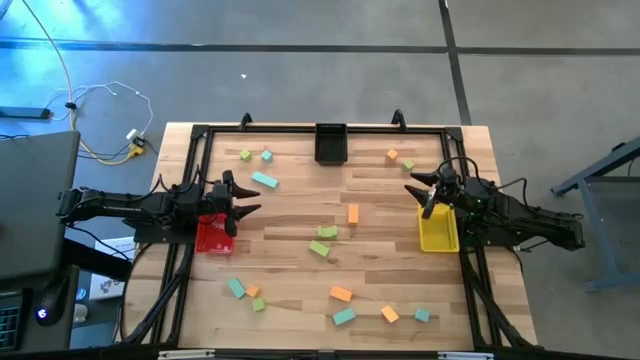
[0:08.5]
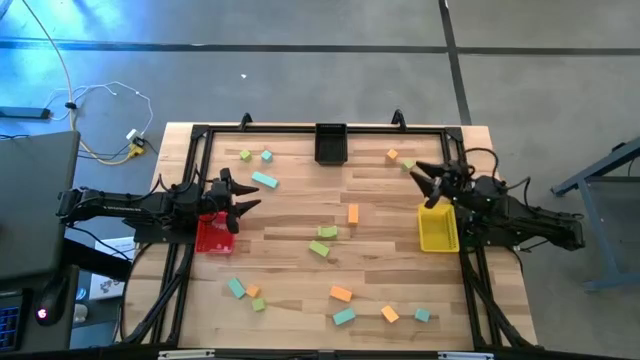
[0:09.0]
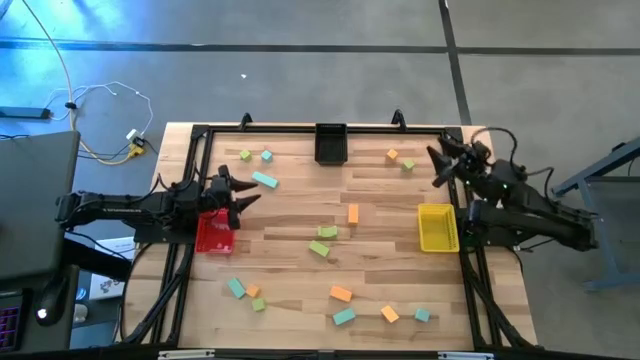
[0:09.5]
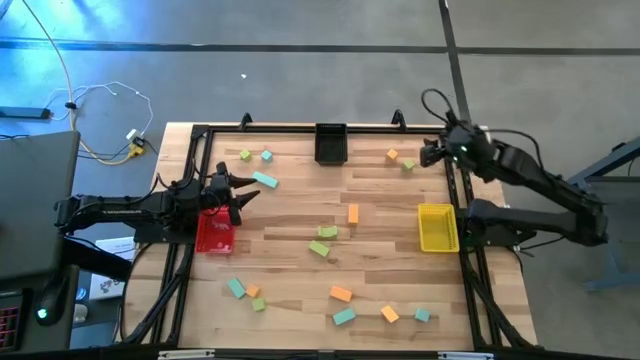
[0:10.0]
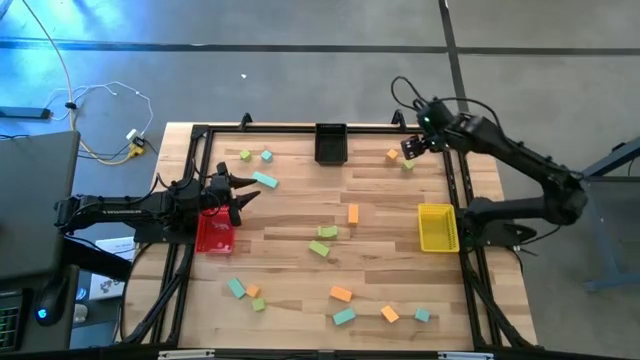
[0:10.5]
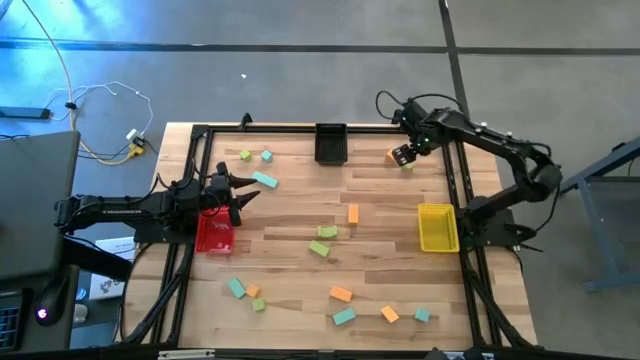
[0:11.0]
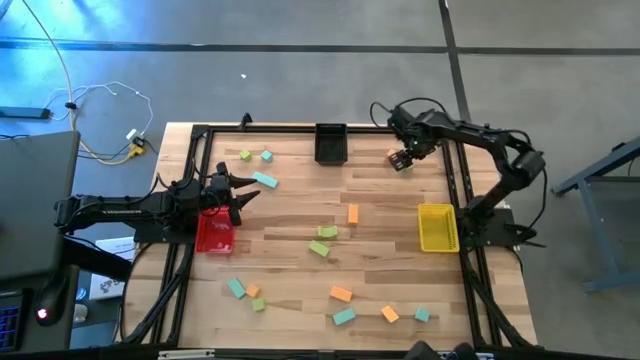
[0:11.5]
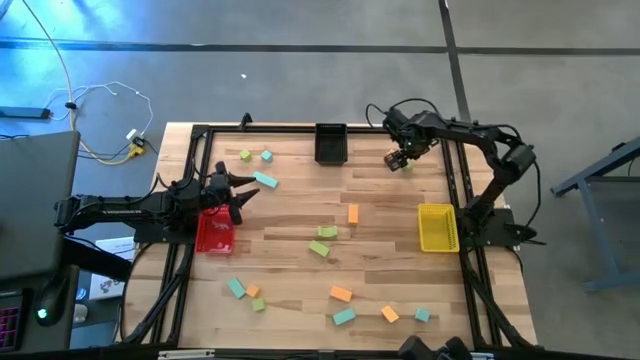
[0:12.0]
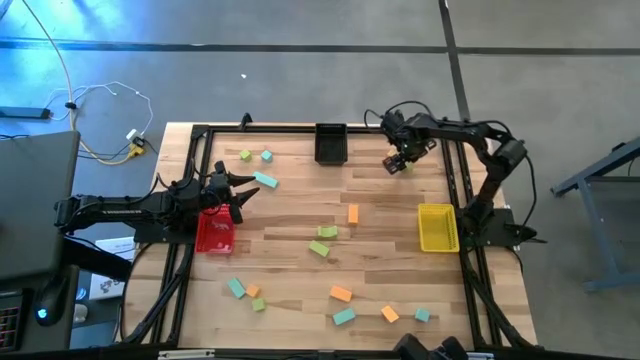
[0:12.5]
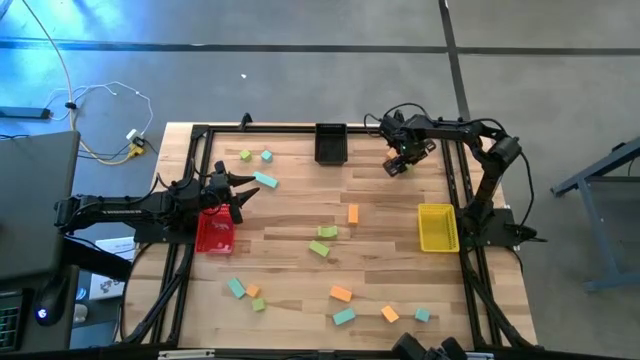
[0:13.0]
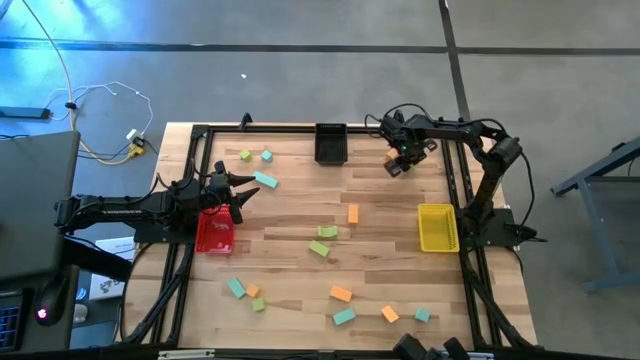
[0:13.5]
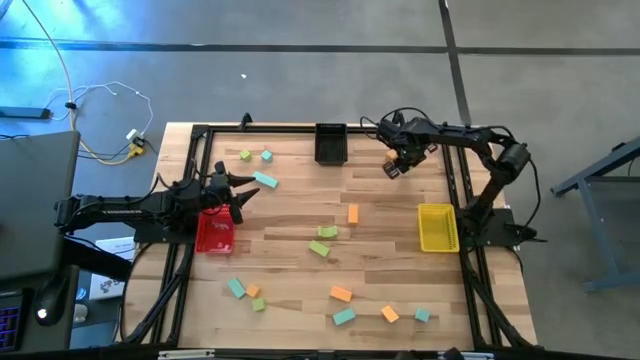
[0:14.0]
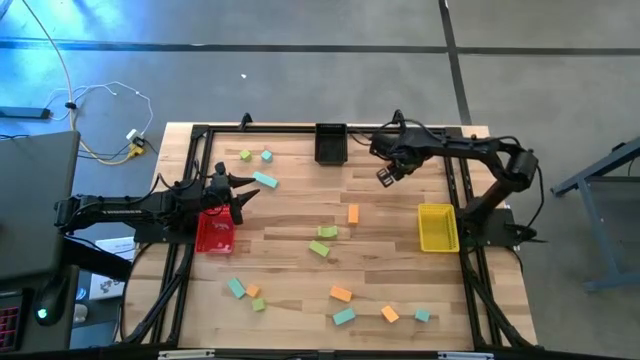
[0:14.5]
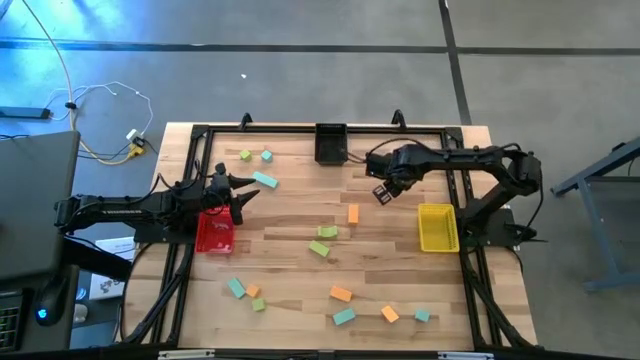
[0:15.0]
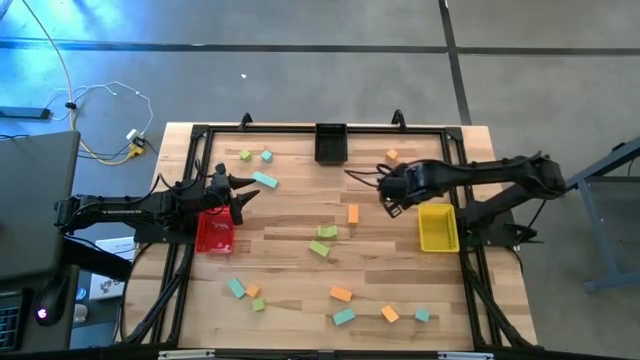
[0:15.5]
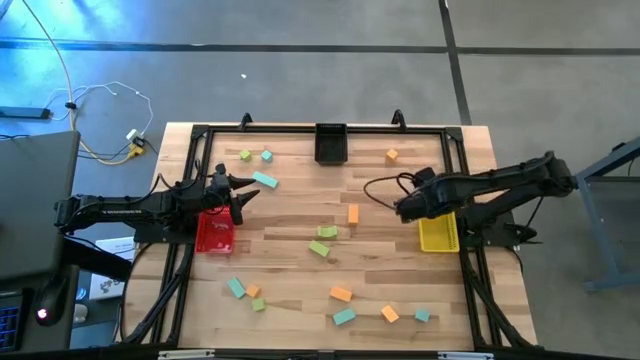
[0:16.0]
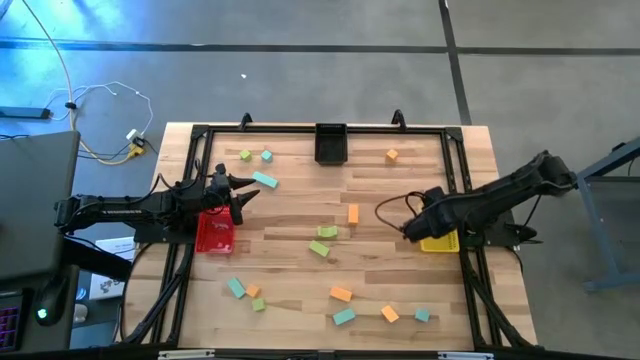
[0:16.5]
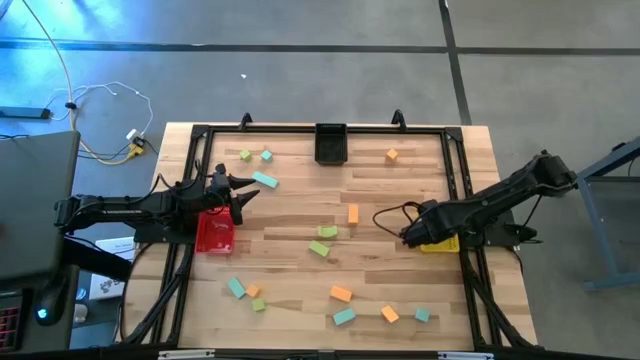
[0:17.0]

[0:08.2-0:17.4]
Task: Sort & place blocks by color
Put the green block into the yellow bin

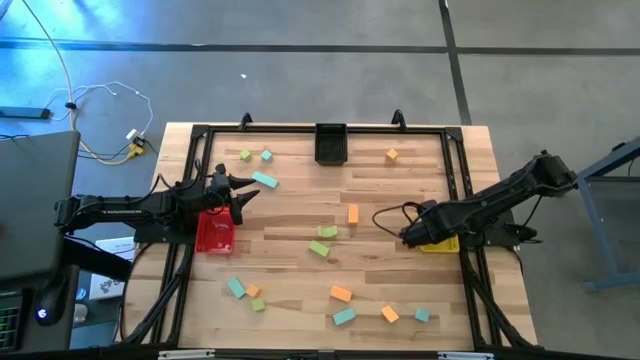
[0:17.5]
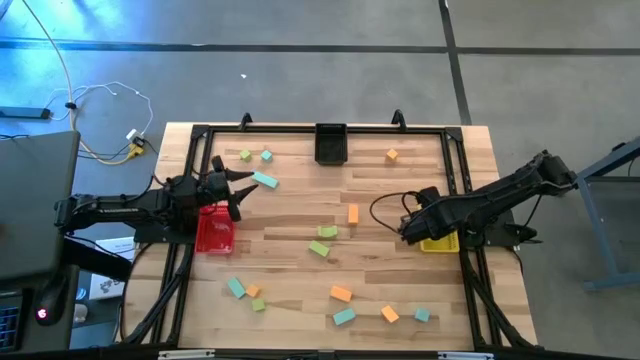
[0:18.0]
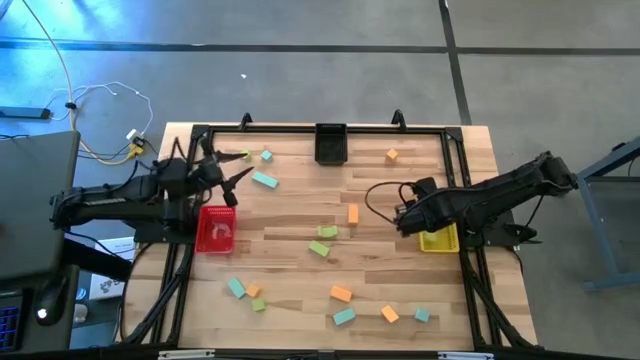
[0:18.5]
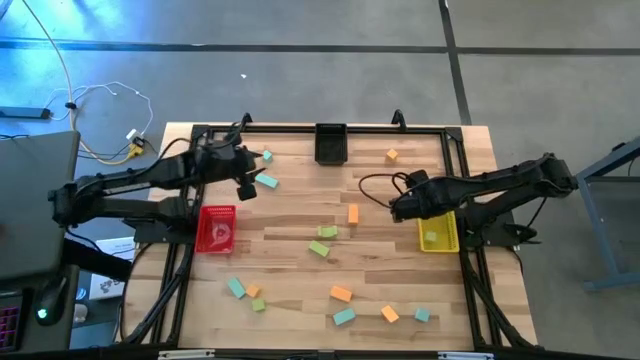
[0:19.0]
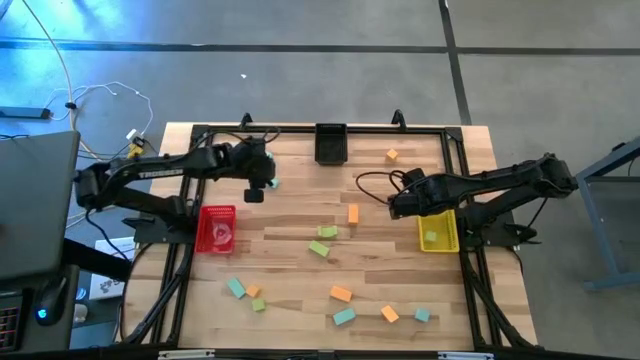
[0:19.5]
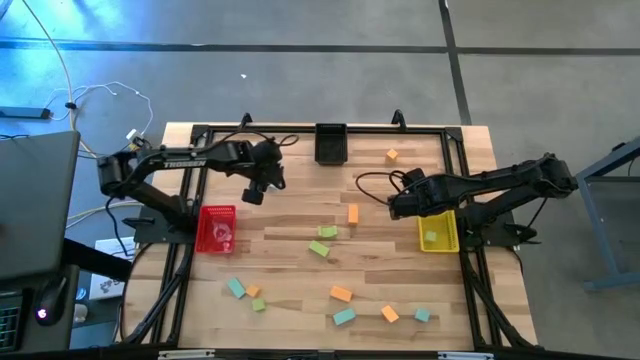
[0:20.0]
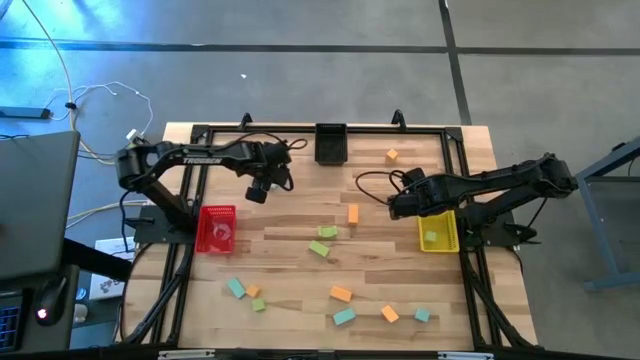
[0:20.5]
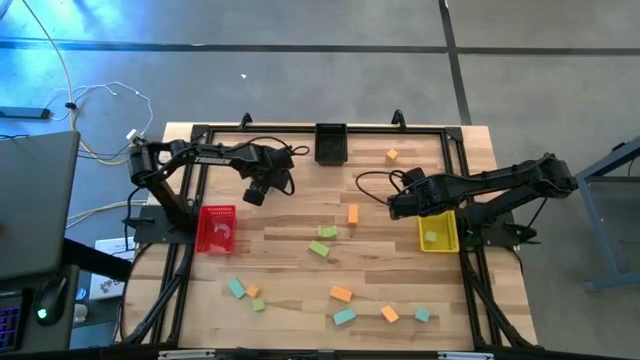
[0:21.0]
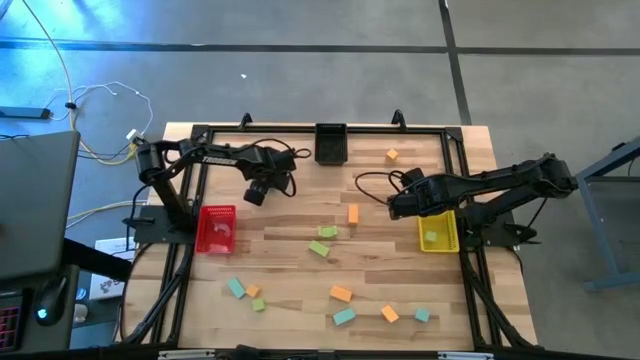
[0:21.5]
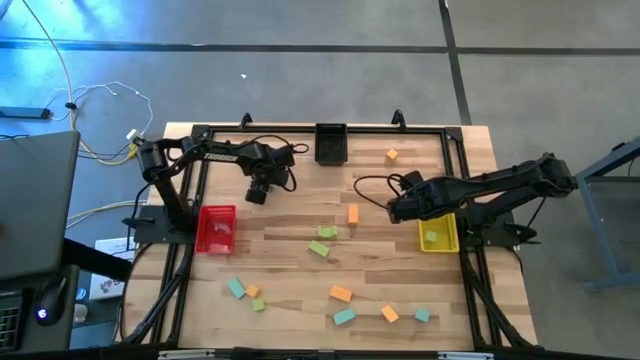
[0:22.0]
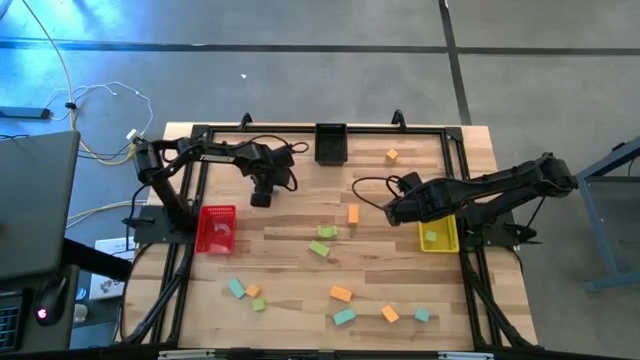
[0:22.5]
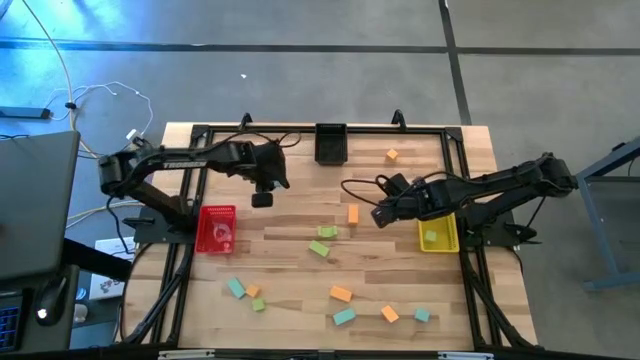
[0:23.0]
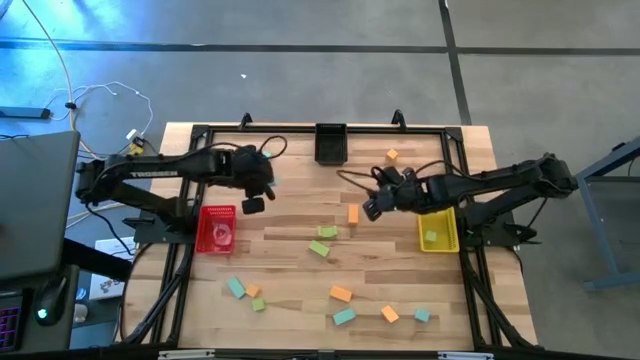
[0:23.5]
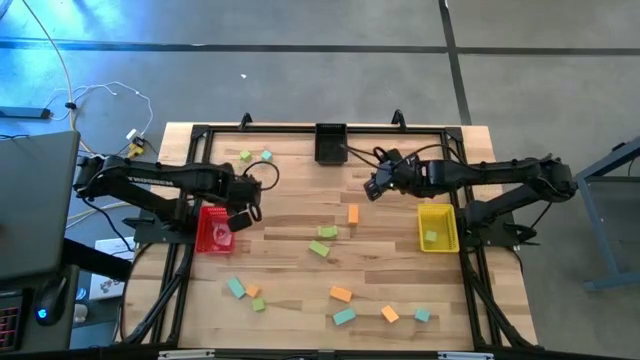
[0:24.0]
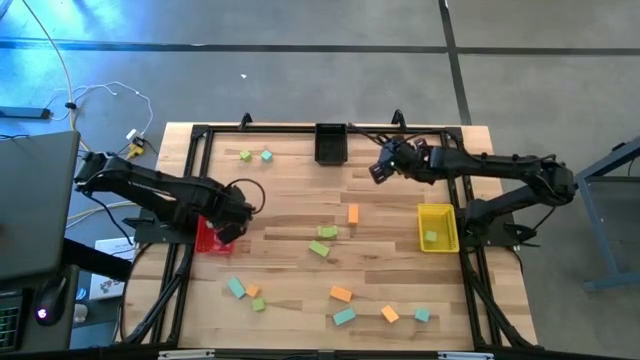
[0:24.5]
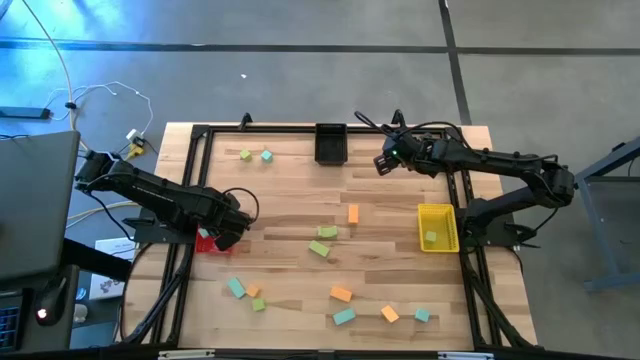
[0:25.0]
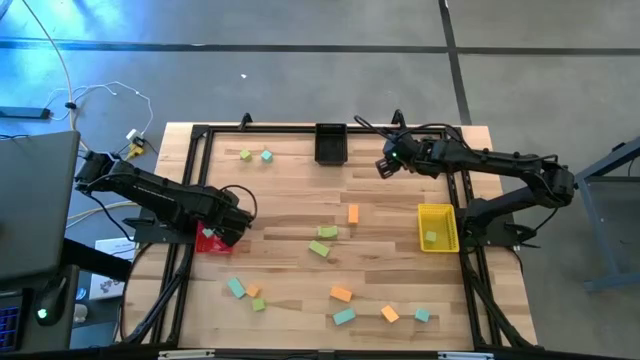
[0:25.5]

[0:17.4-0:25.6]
Put the blue block into the red bin

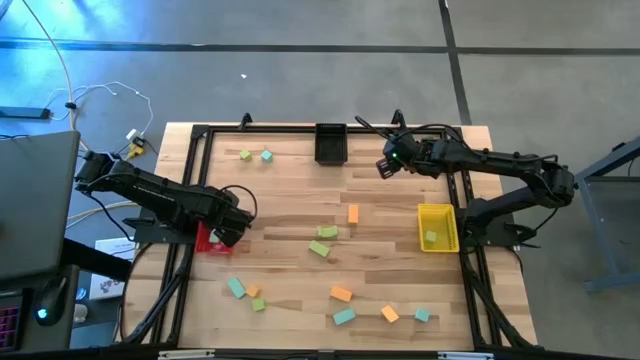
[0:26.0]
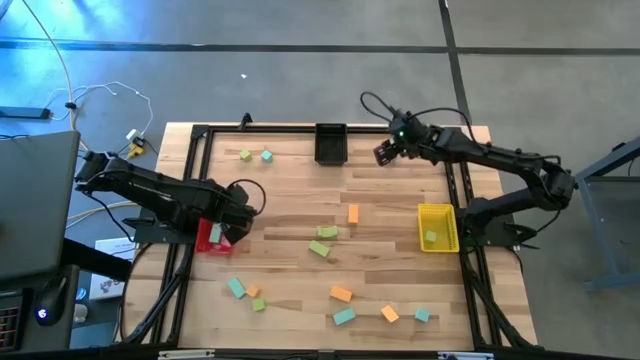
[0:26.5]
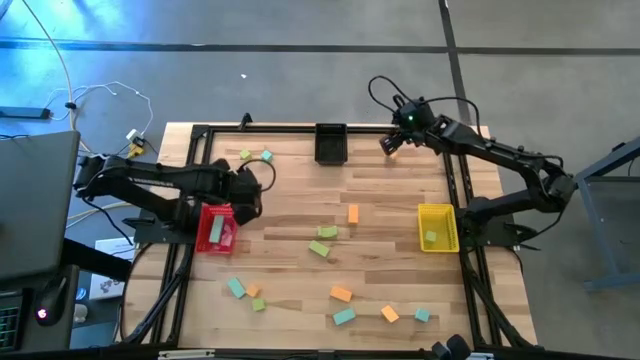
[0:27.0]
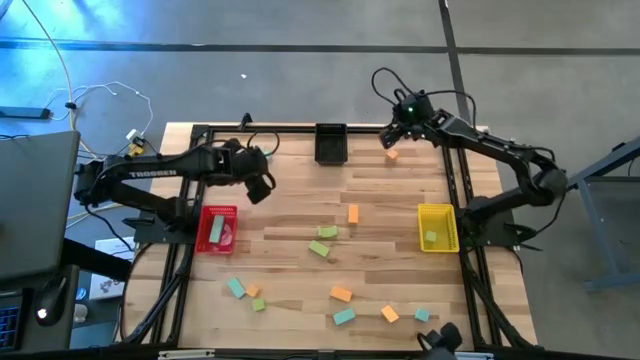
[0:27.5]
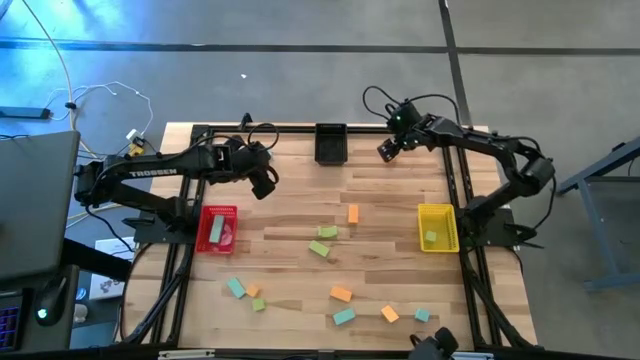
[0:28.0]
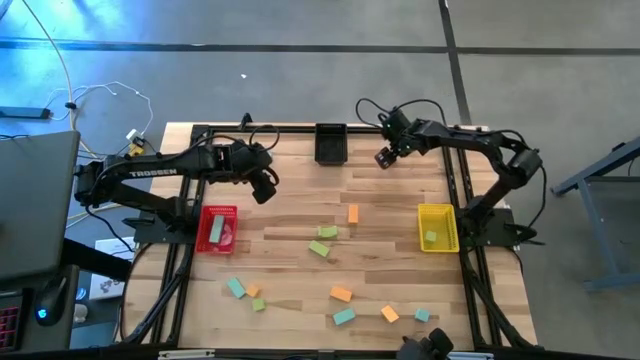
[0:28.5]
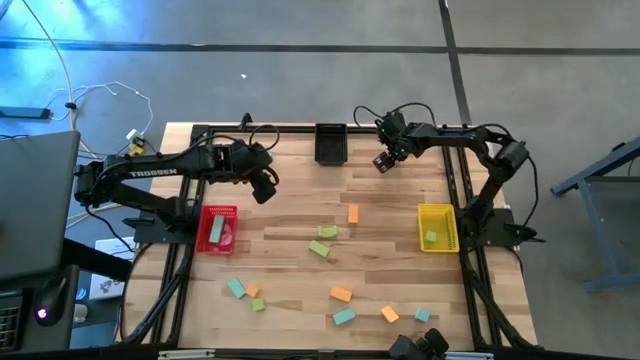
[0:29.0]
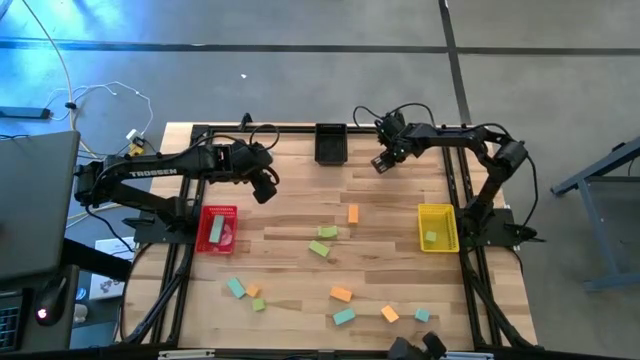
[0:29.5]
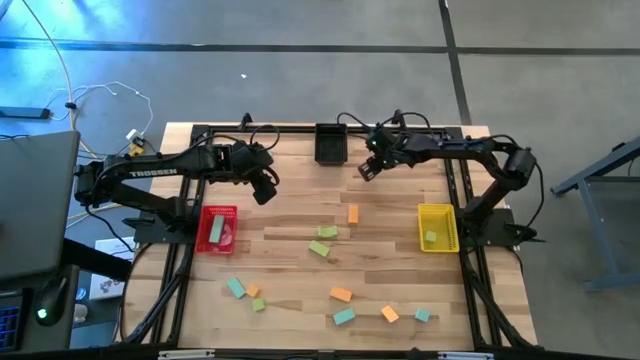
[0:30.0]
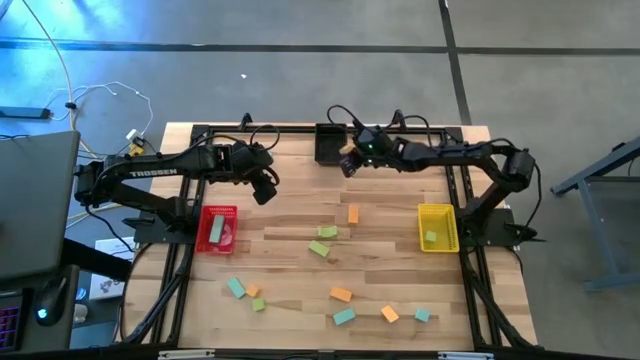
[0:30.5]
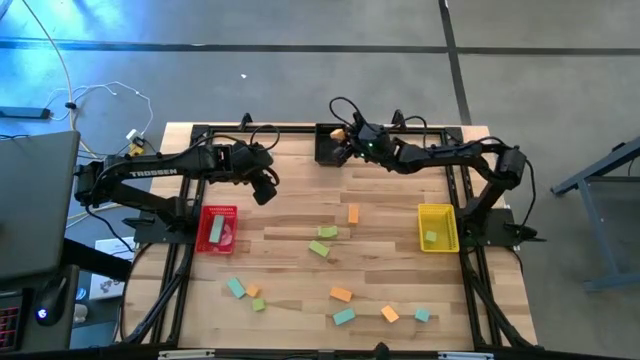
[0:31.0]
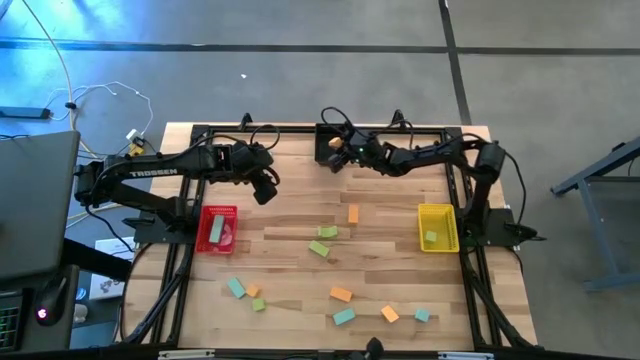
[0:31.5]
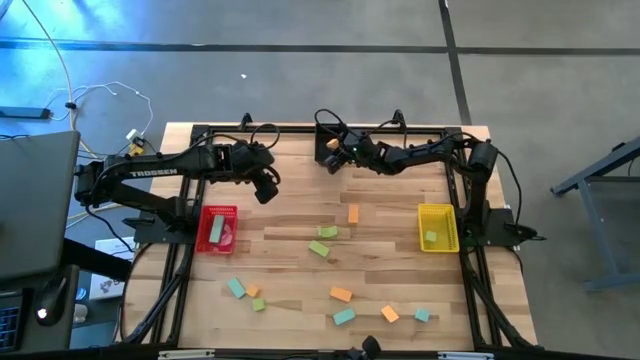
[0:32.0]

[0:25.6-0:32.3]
Put the orange block into the black bin
